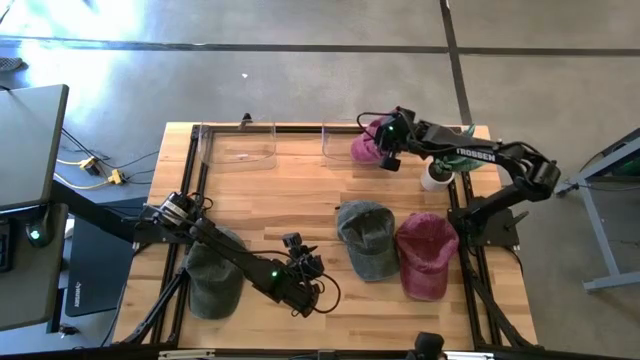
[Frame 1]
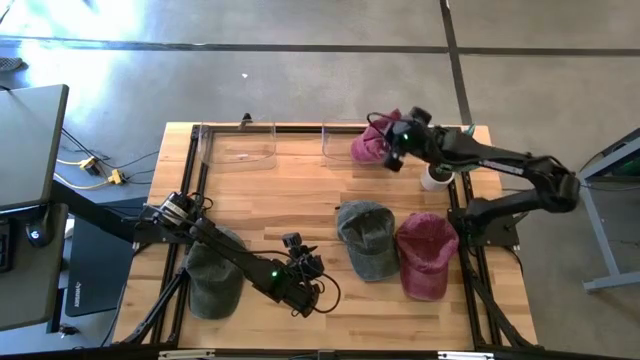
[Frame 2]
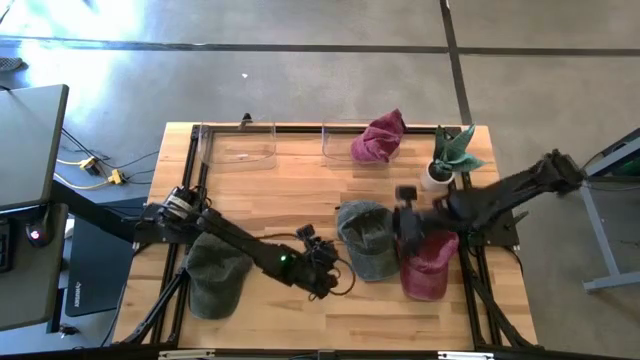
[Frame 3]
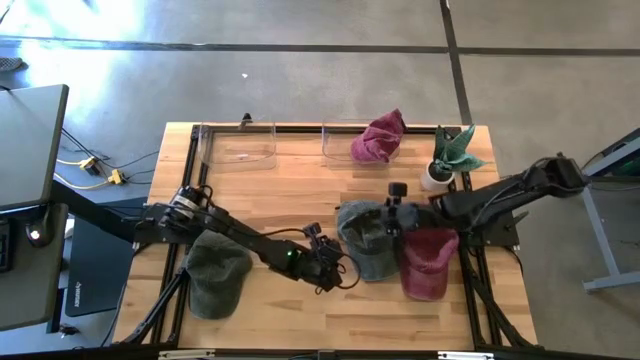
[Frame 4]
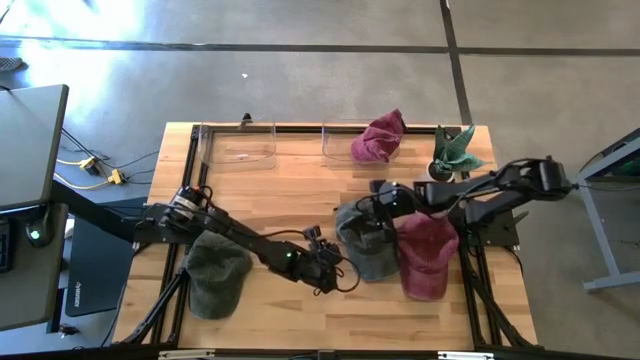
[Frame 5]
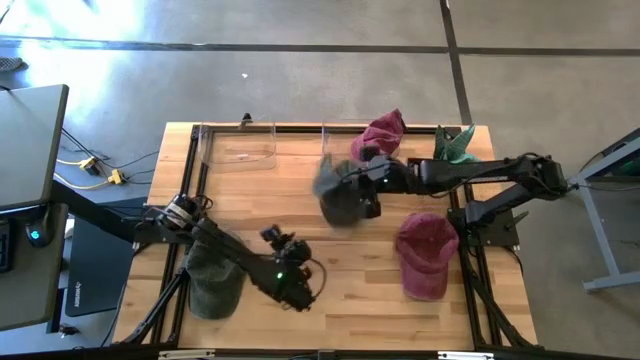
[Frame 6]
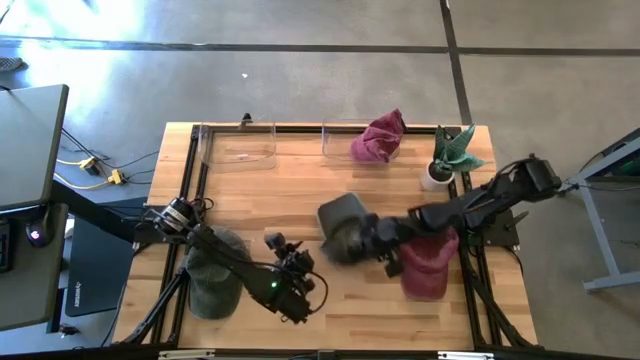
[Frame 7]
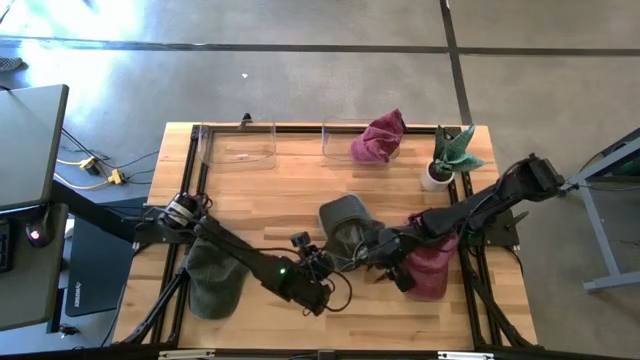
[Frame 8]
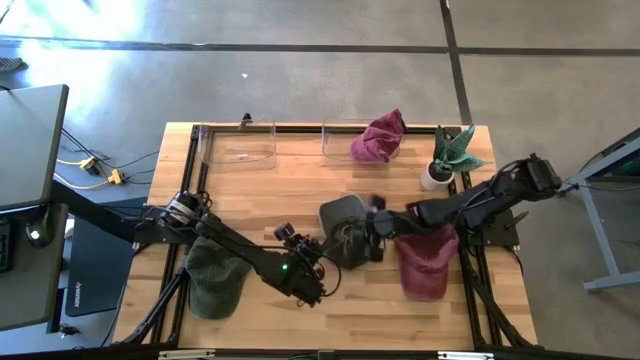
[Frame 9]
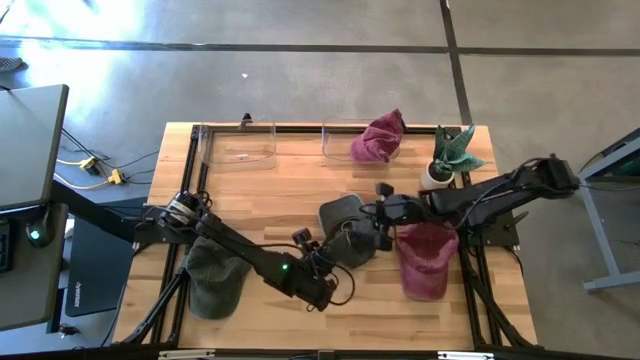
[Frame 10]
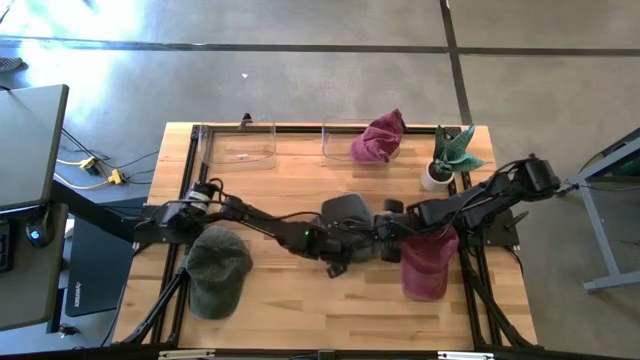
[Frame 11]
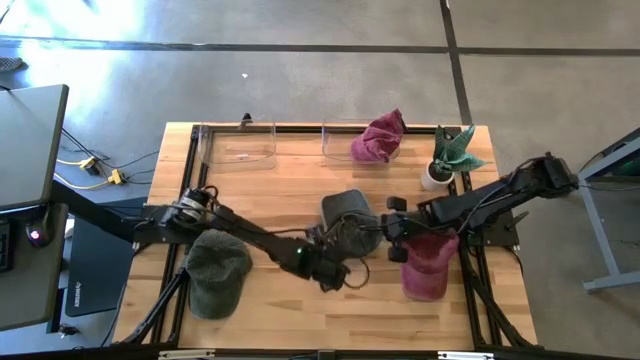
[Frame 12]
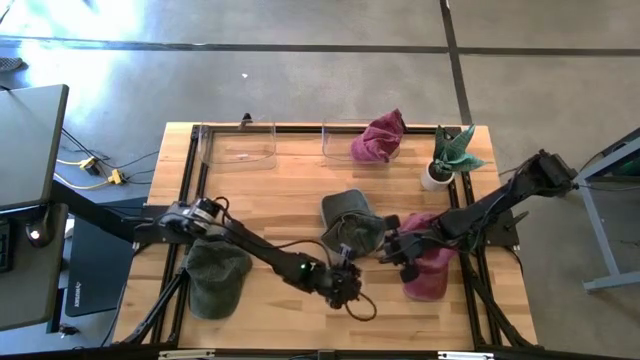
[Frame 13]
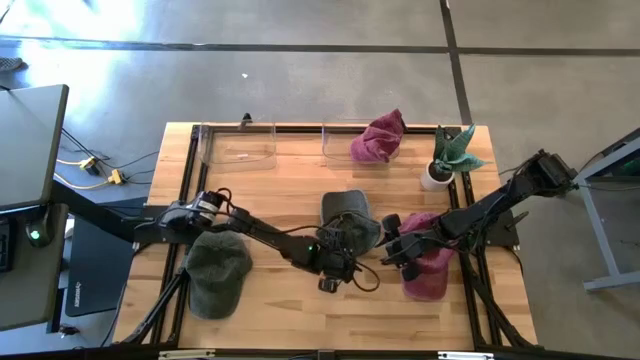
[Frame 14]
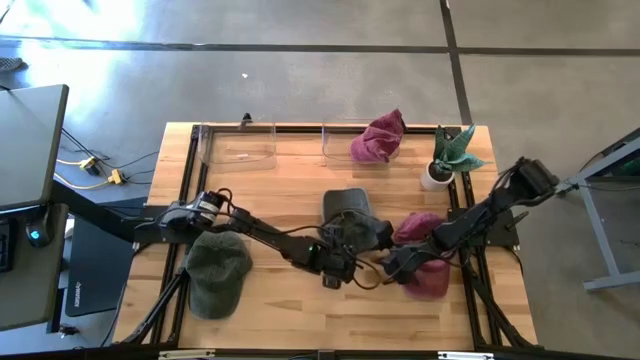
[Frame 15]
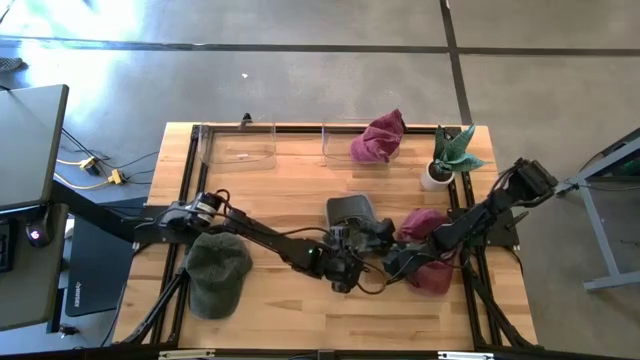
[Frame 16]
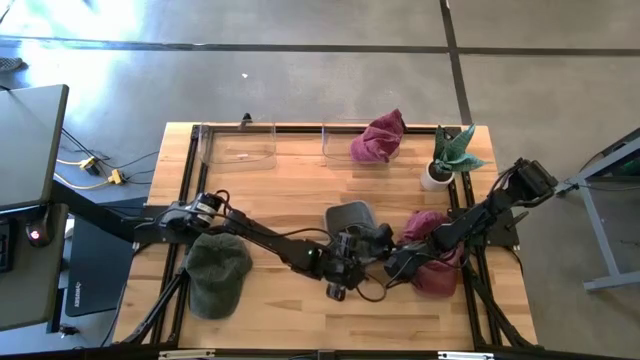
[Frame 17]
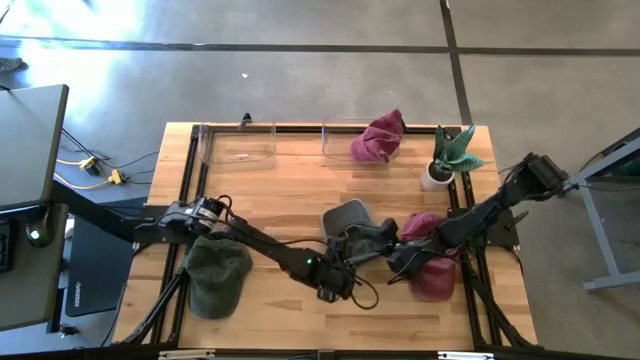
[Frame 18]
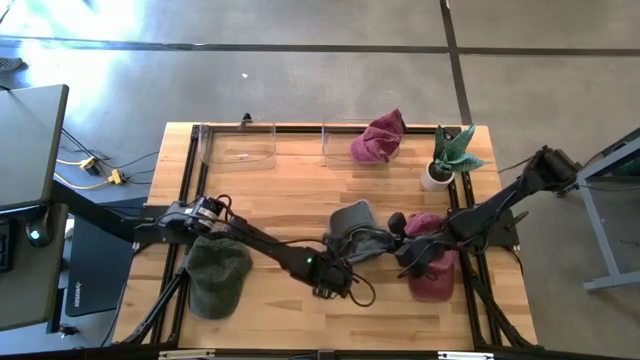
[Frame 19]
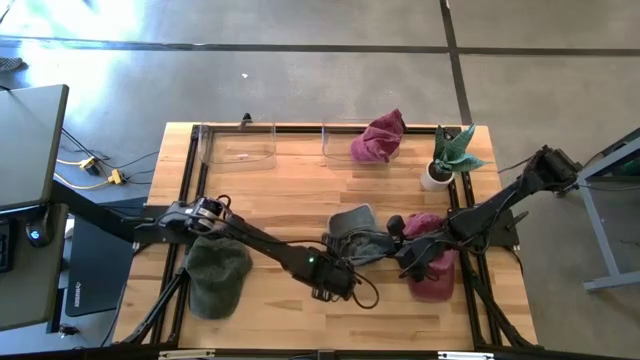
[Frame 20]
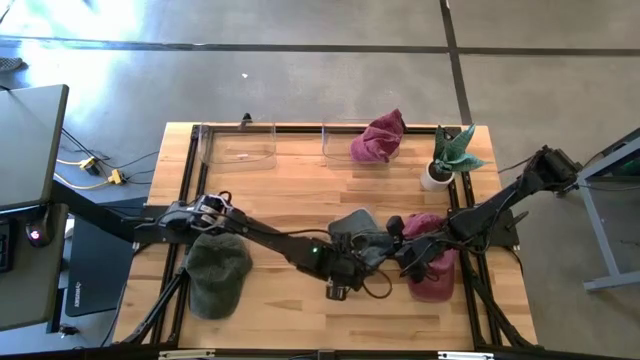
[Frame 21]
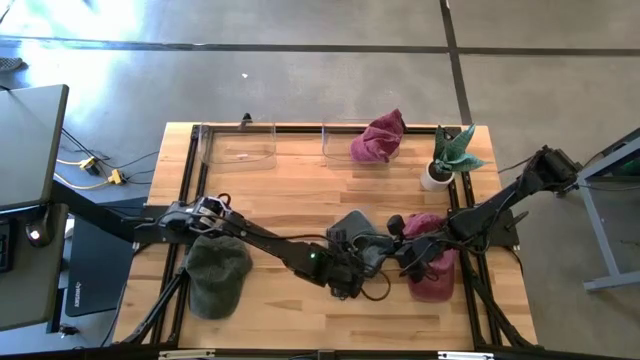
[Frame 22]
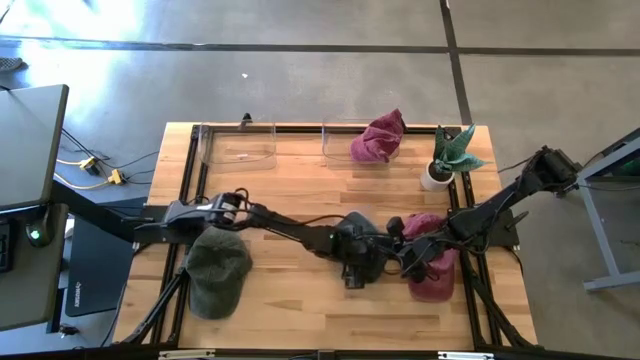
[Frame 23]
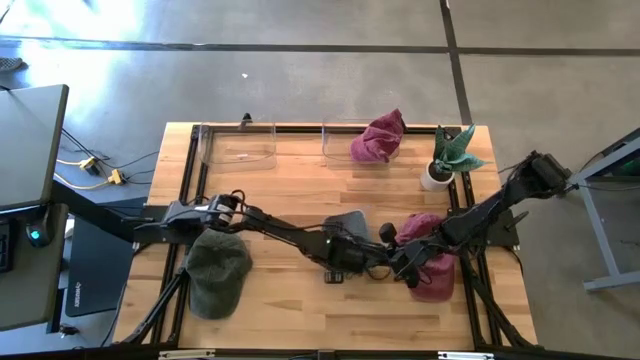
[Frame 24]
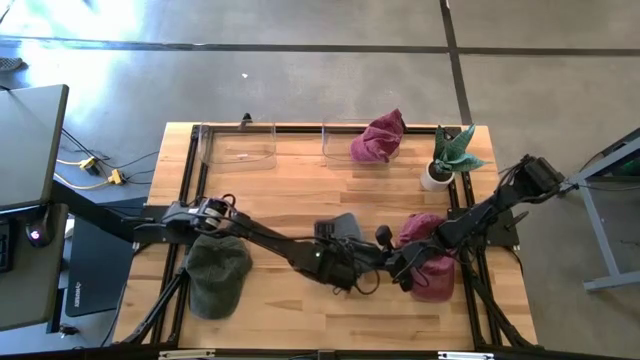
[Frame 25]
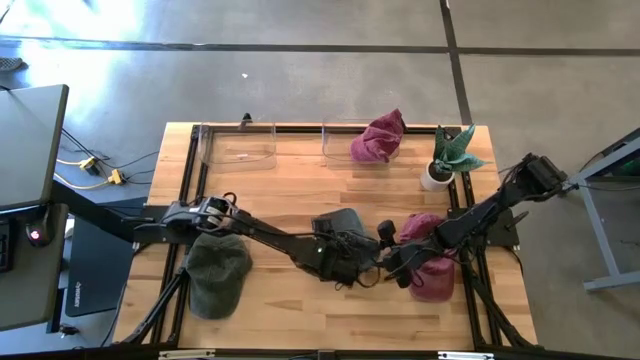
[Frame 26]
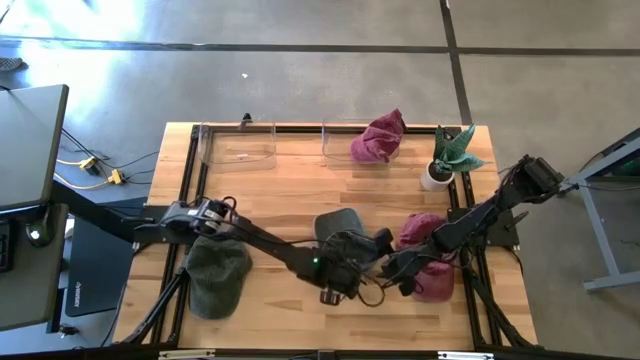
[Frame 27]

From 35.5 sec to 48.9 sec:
Task: Pick & Place hat
Put the right black cap into the left transparent bin

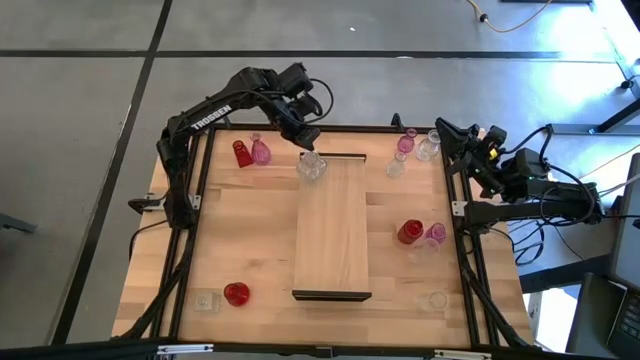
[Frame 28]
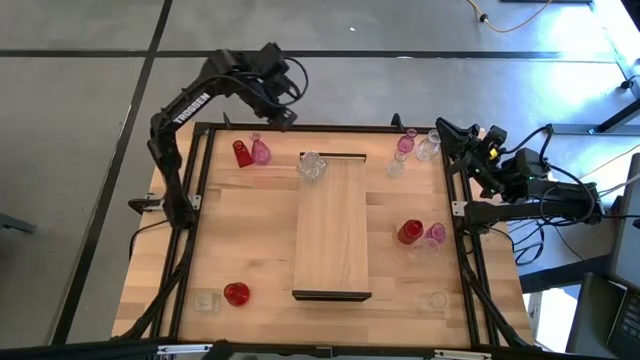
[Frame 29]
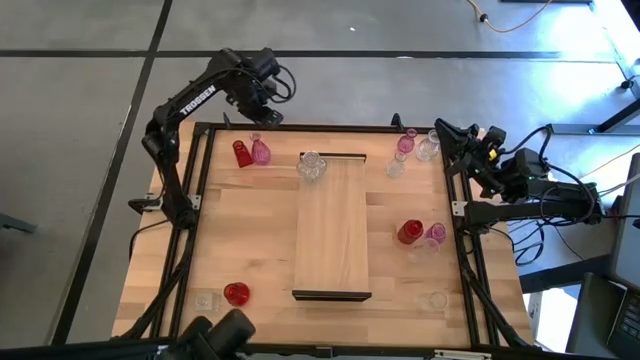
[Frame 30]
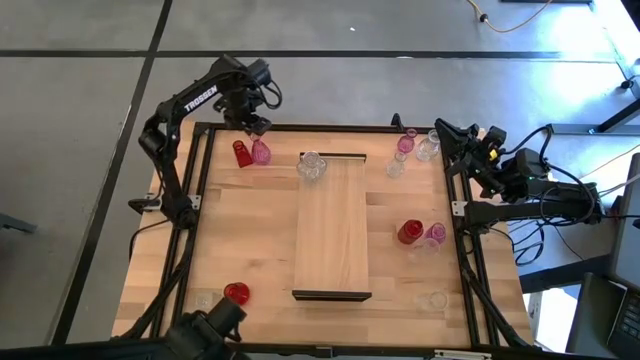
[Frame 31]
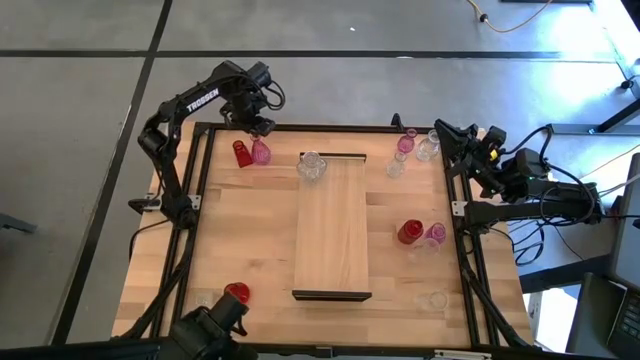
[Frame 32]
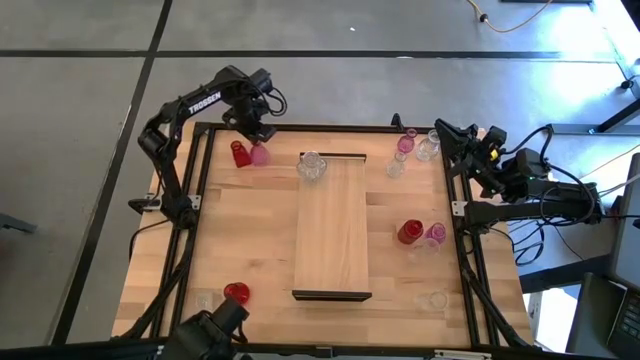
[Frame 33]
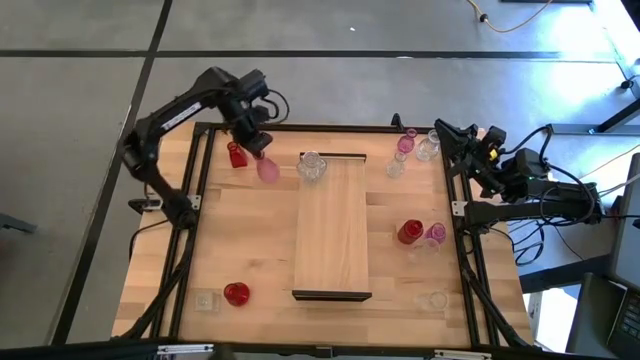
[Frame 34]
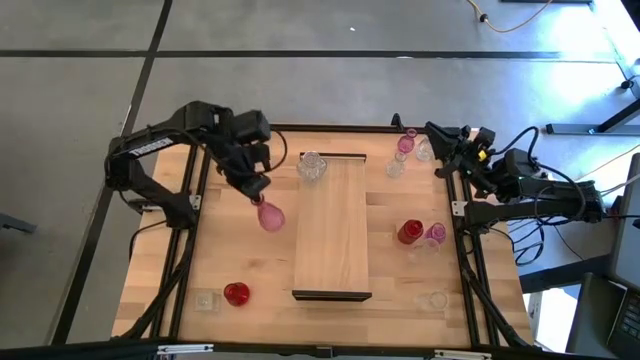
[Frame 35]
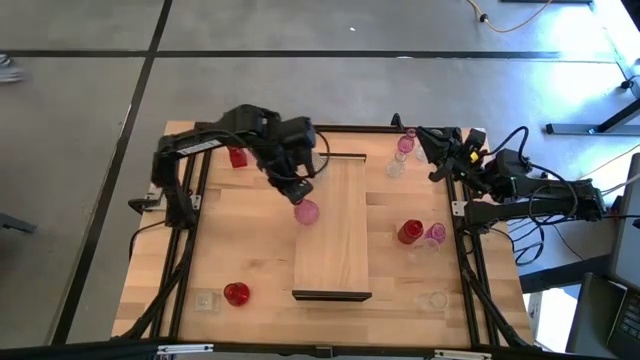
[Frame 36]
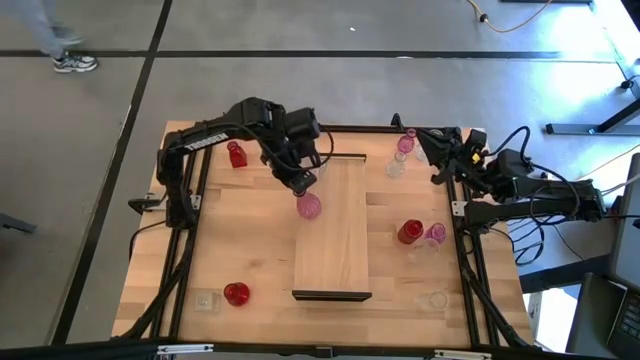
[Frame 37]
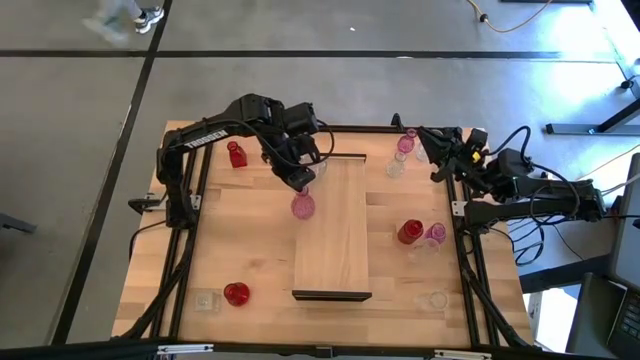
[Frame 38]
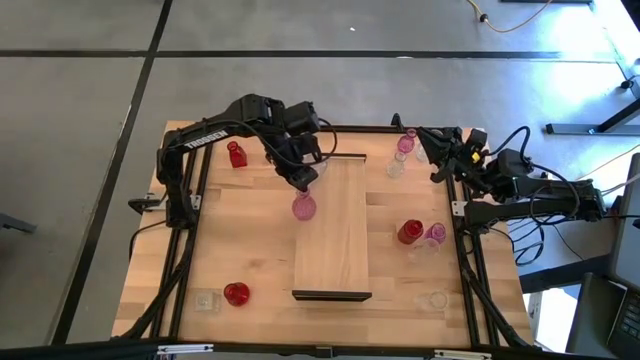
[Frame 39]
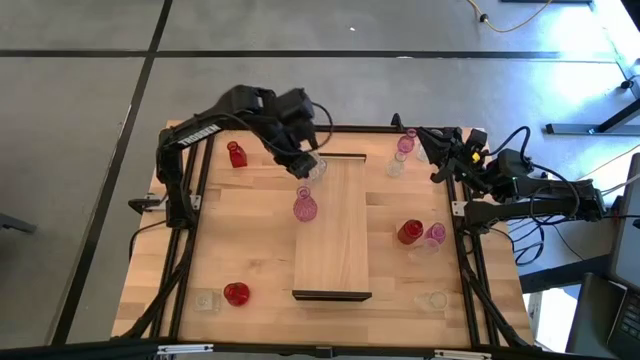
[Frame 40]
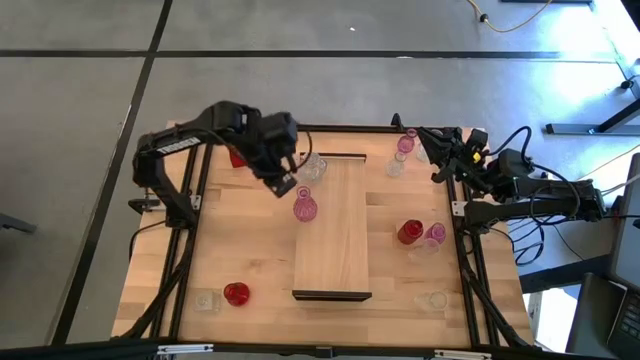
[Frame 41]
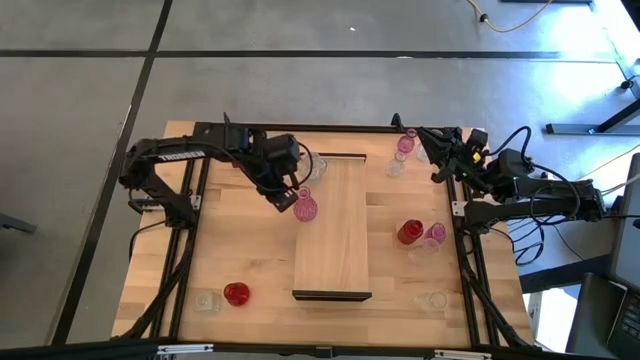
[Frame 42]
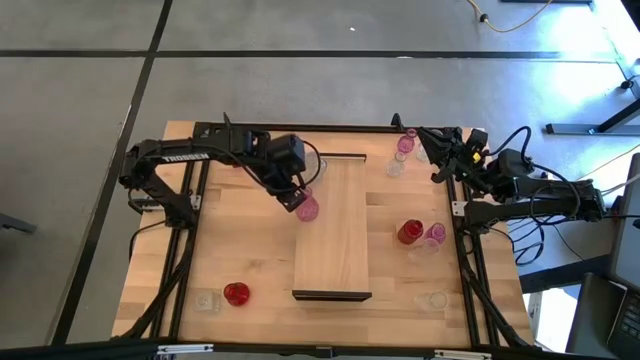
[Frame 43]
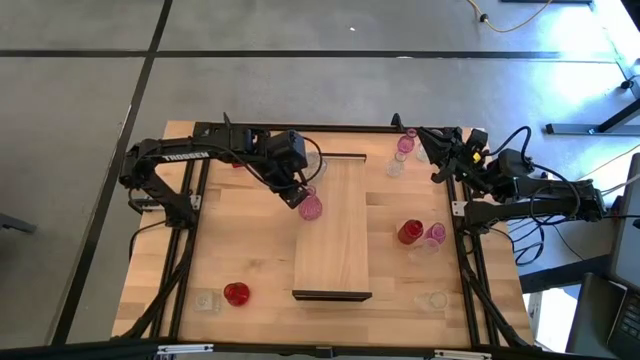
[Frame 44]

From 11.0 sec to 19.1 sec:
Task: sort vases onto shelf
Put the pink vase on the shelf
